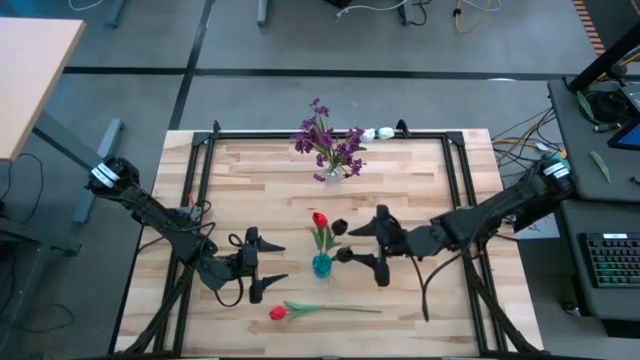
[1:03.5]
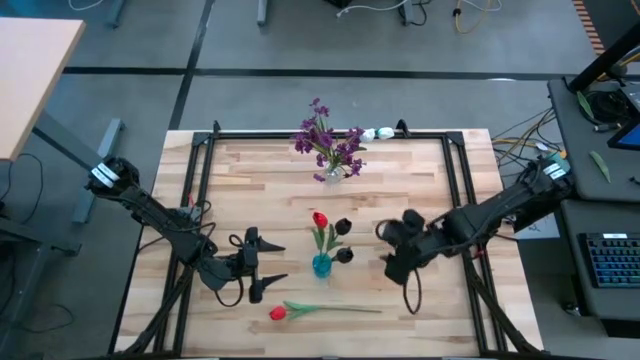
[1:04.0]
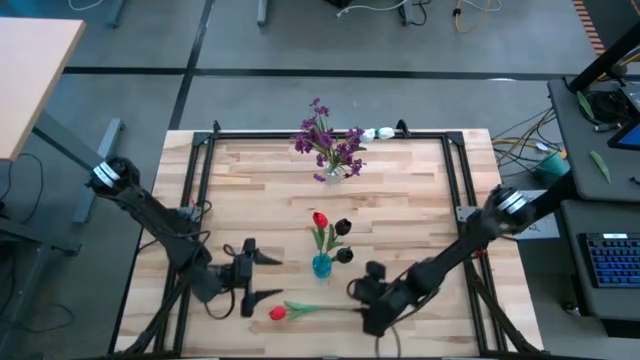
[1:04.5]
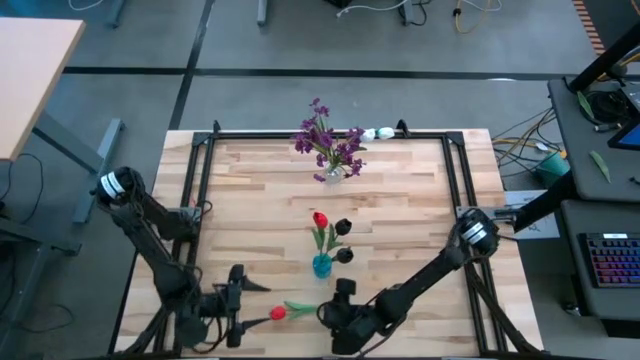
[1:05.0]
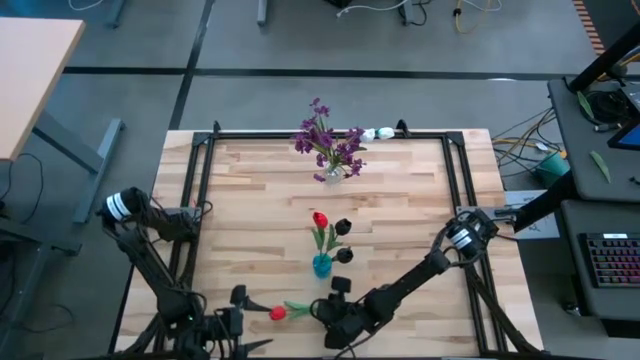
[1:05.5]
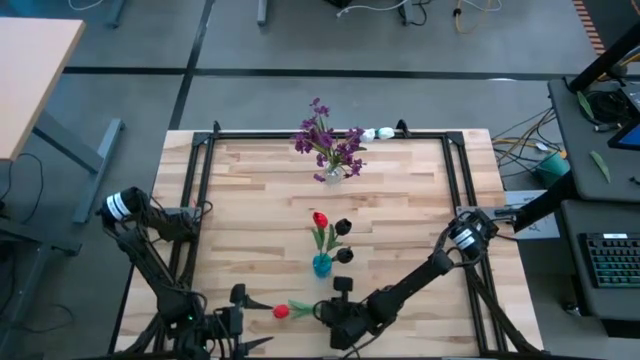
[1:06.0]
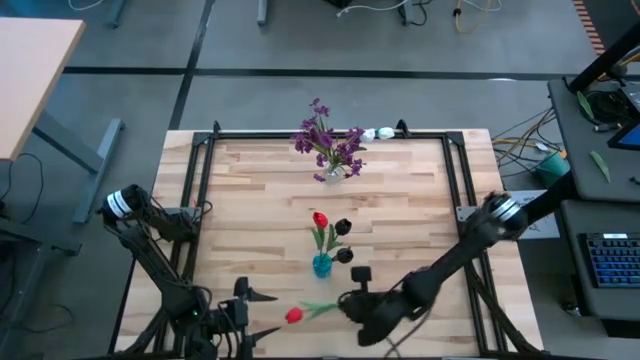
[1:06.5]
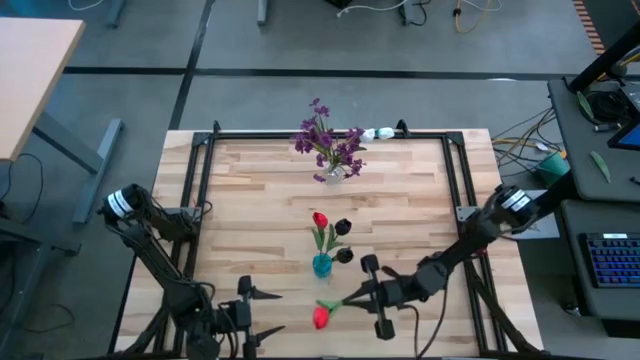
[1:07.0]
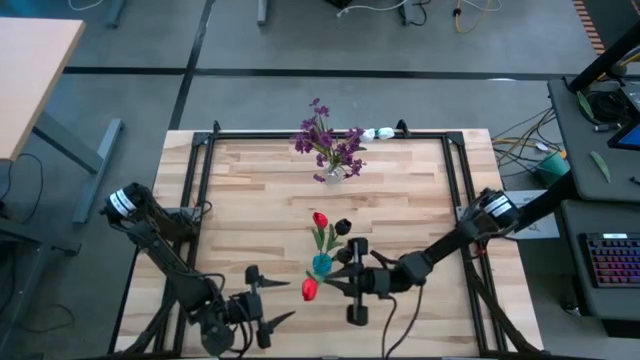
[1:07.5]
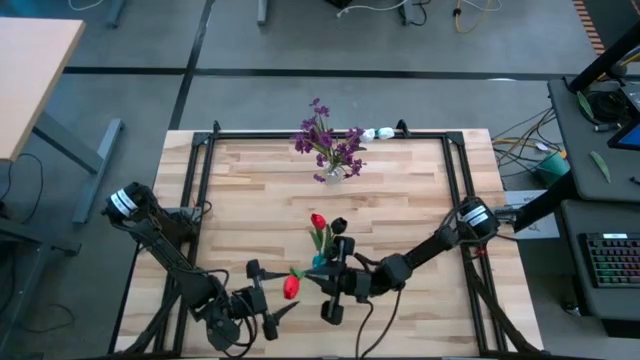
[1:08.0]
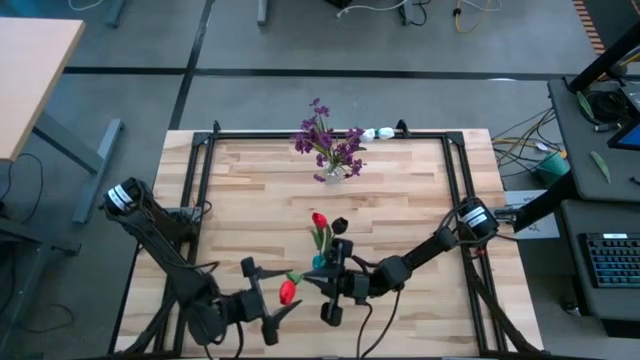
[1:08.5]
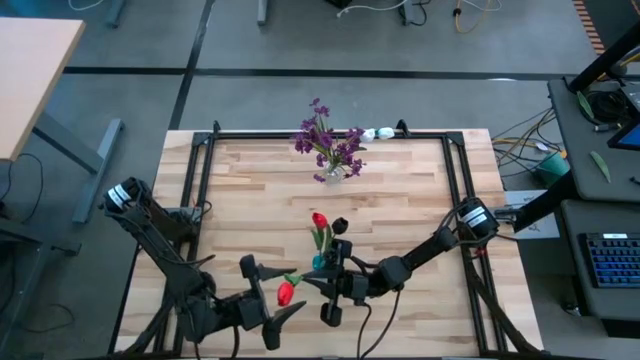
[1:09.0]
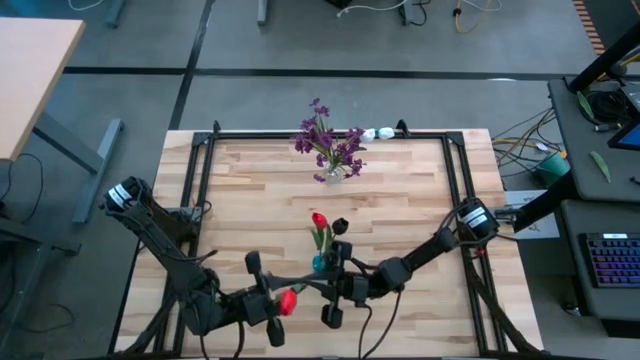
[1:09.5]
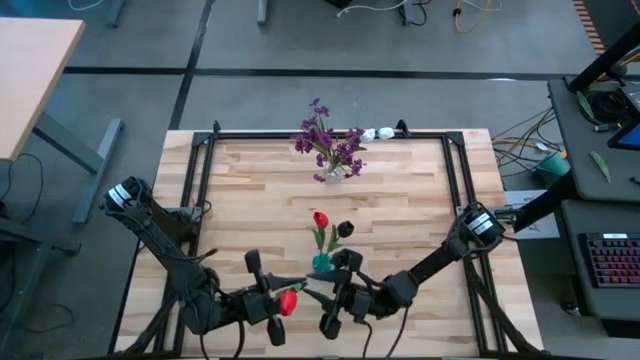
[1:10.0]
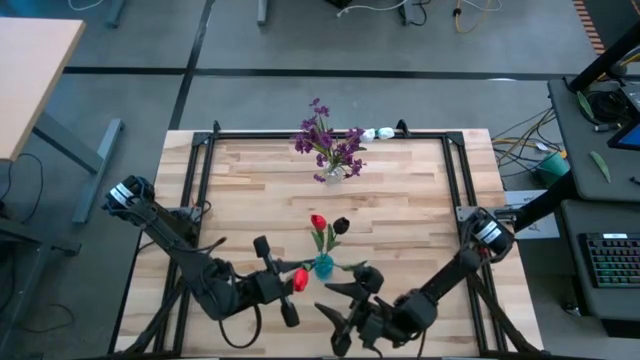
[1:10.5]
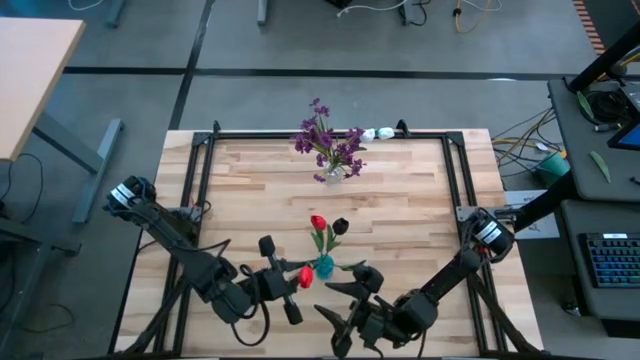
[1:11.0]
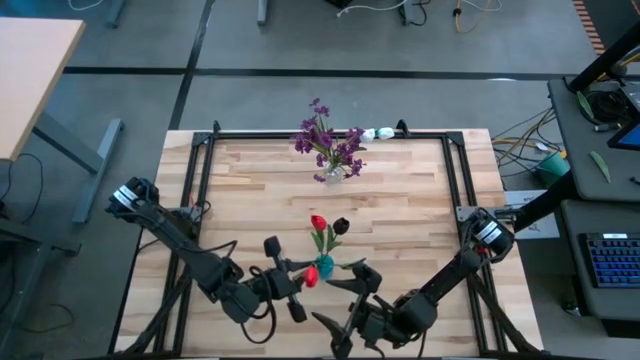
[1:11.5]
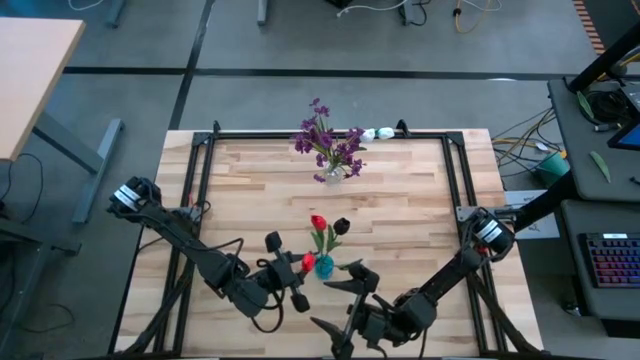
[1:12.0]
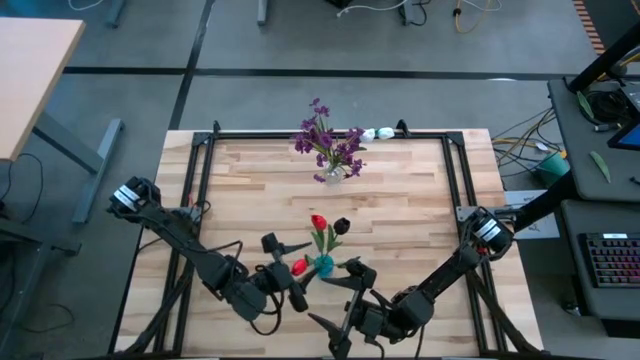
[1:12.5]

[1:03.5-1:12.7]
Task: Sort flowers into vase by color
Put the red flower into the blue vase

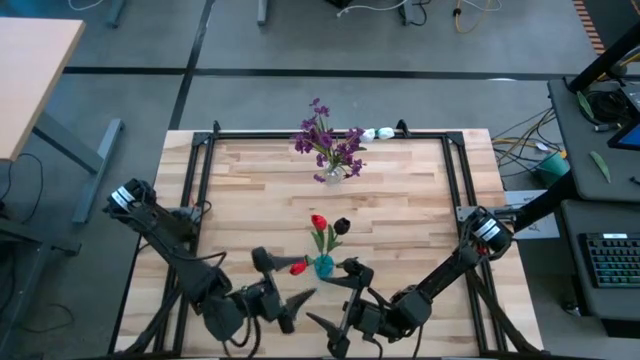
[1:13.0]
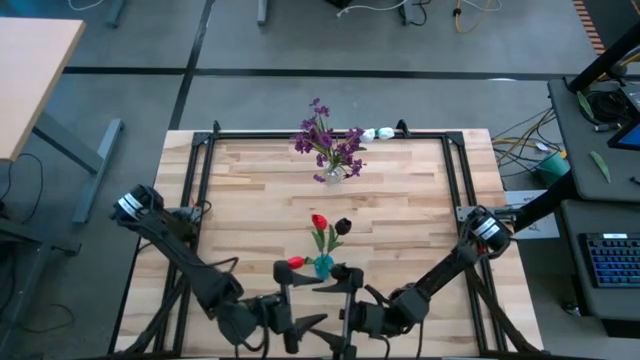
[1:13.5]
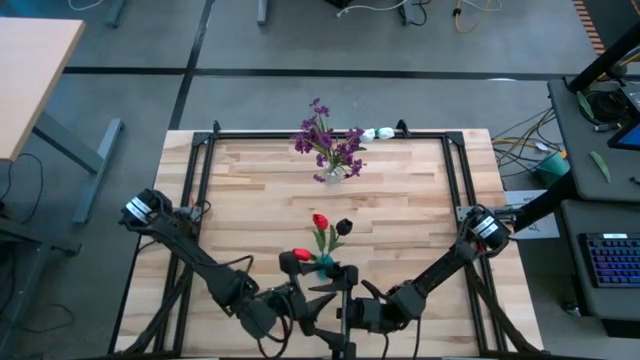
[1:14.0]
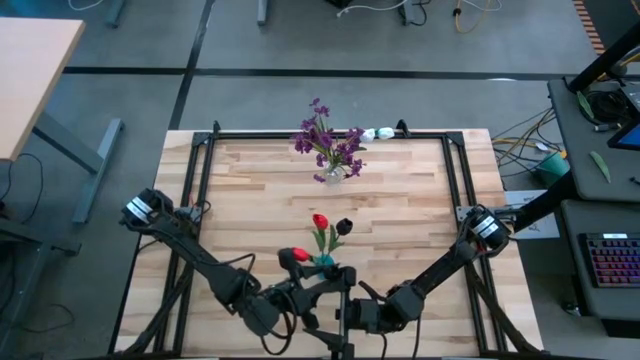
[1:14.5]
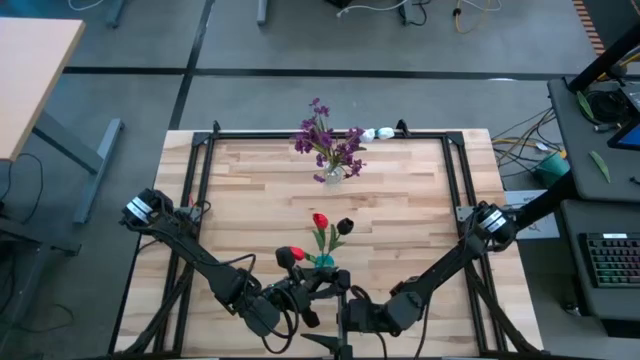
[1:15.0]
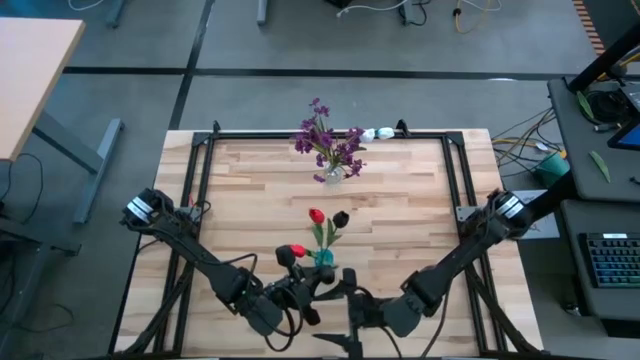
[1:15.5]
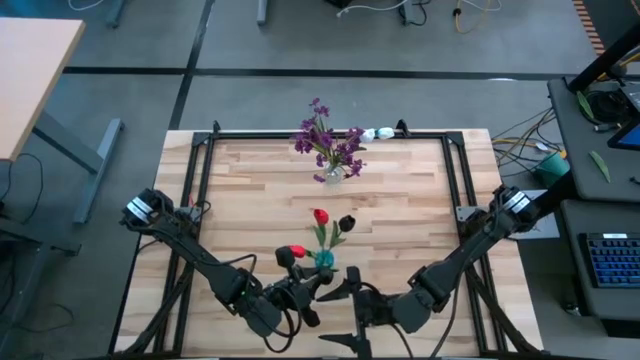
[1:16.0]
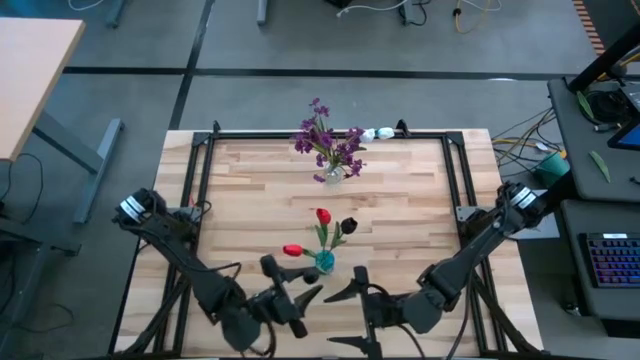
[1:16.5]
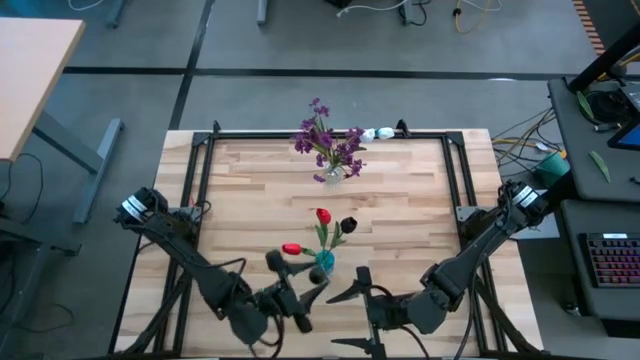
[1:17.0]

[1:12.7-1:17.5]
Adjust the black flower in the blue vase

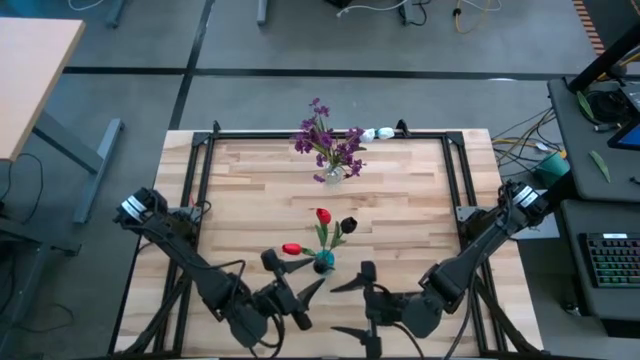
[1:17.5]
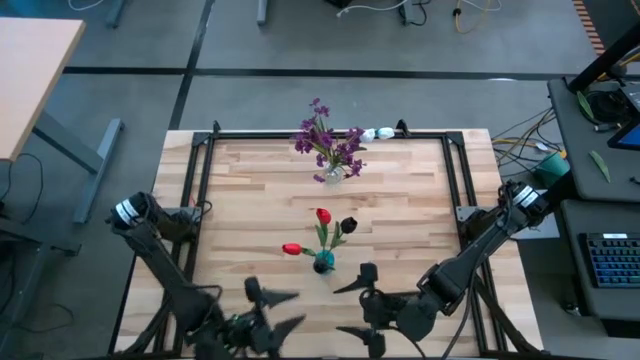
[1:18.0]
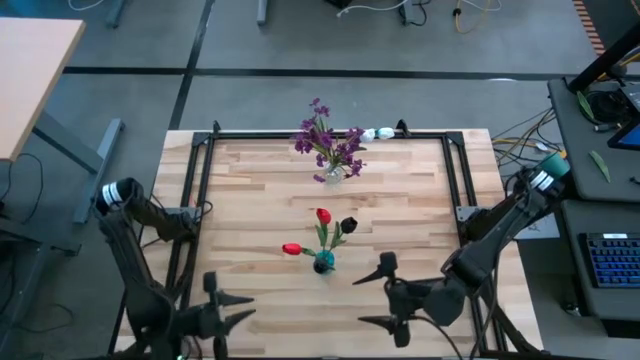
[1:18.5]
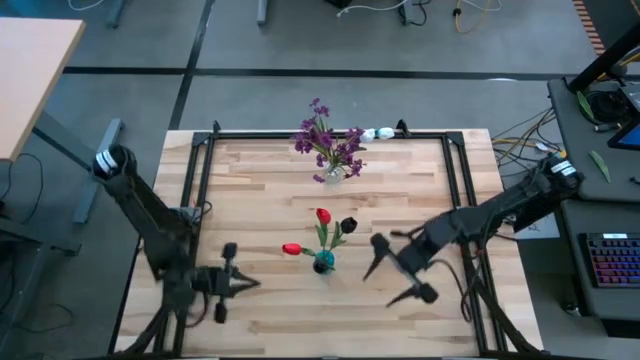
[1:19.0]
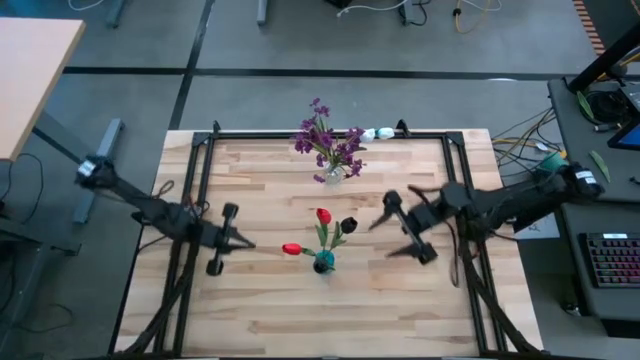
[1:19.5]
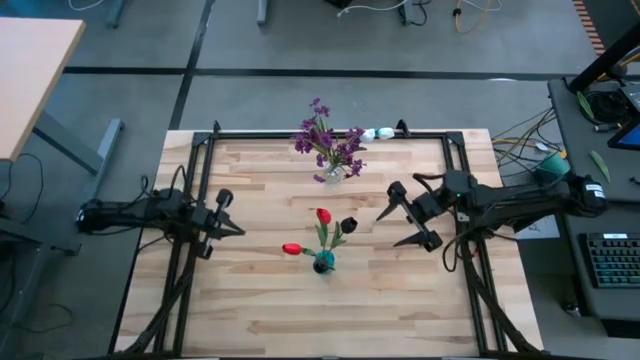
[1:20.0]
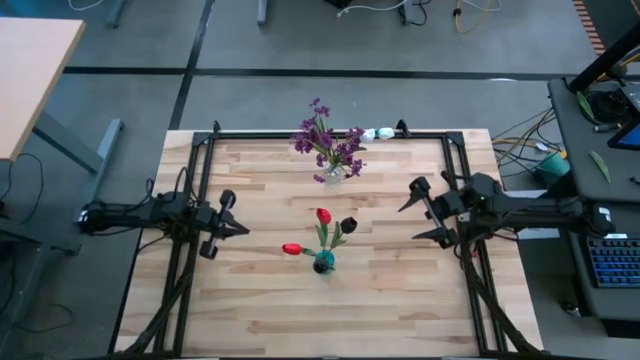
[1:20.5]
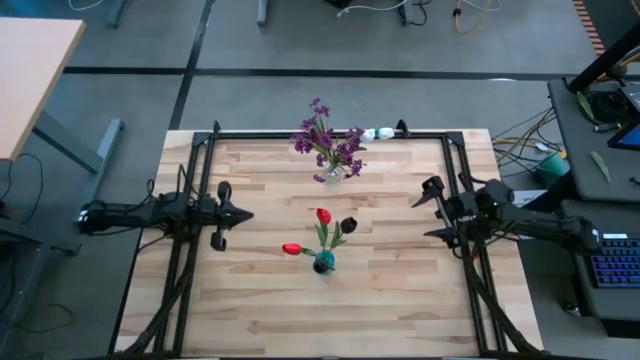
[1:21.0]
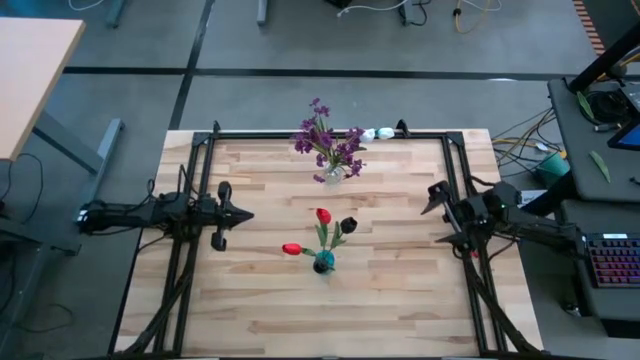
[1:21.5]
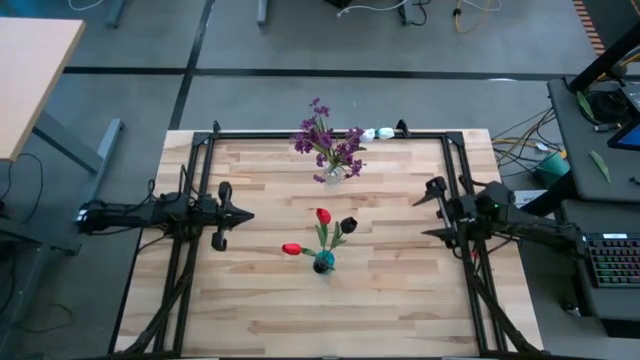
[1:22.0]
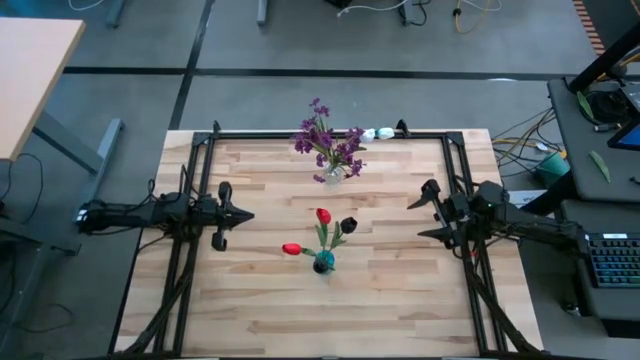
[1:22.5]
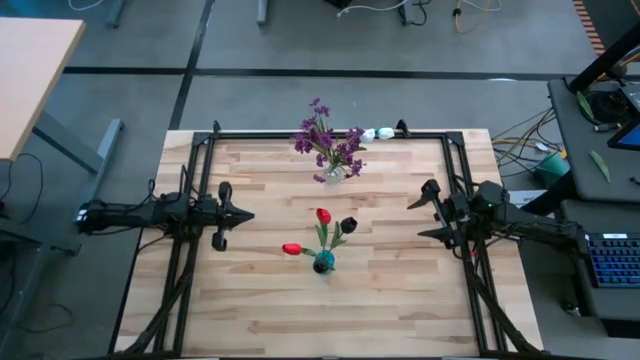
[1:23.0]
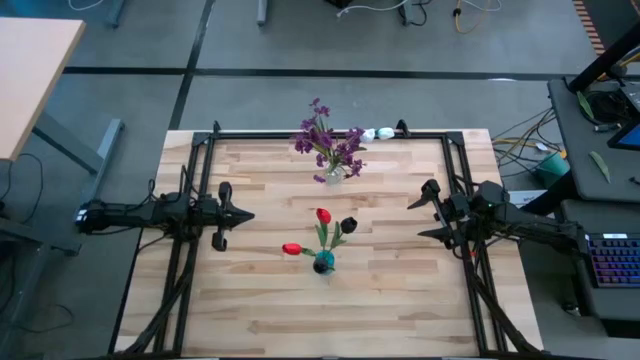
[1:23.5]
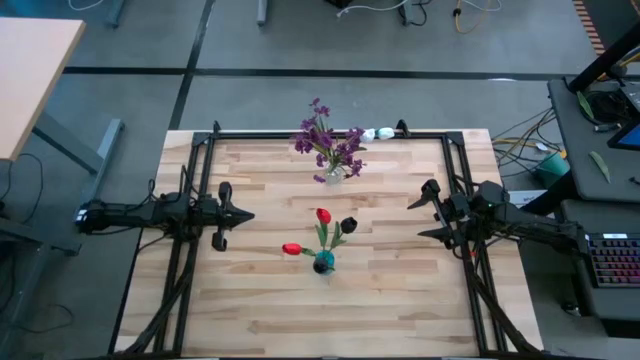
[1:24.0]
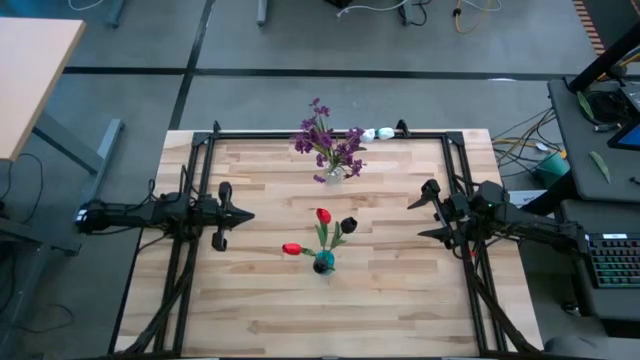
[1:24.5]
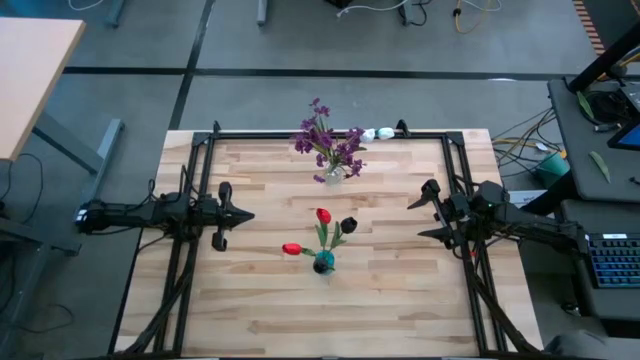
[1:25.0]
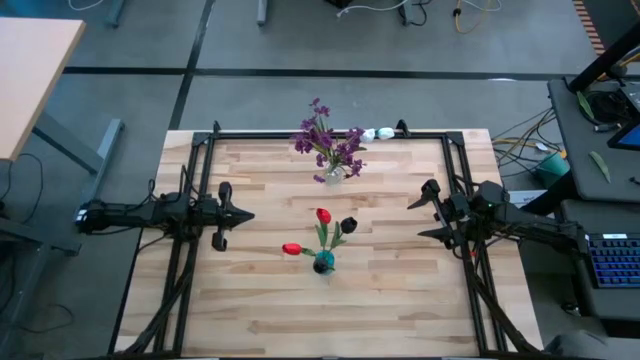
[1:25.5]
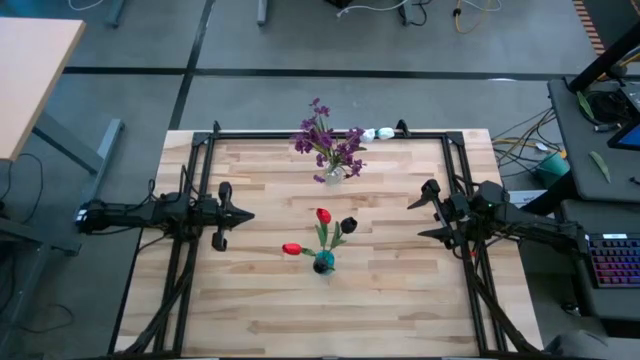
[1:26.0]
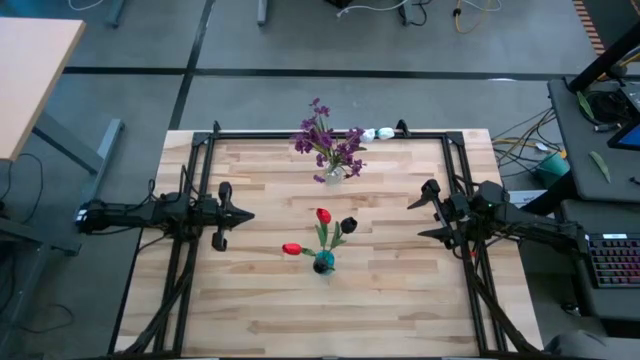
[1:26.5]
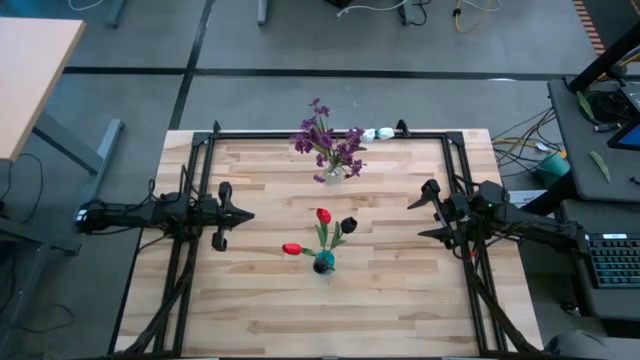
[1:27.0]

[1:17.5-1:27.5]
Return to Home Position
